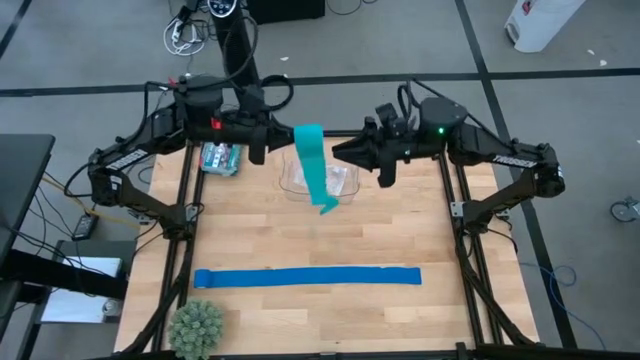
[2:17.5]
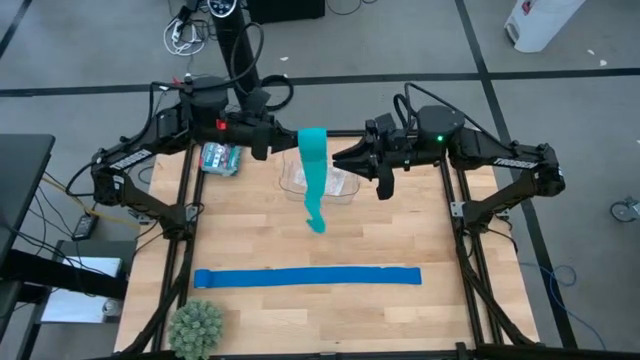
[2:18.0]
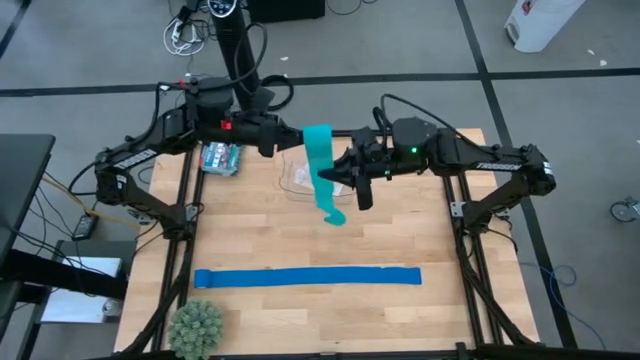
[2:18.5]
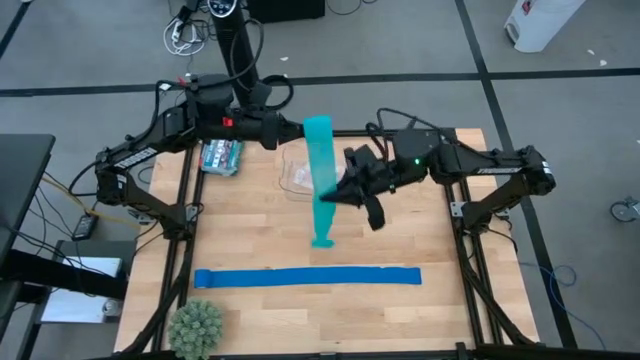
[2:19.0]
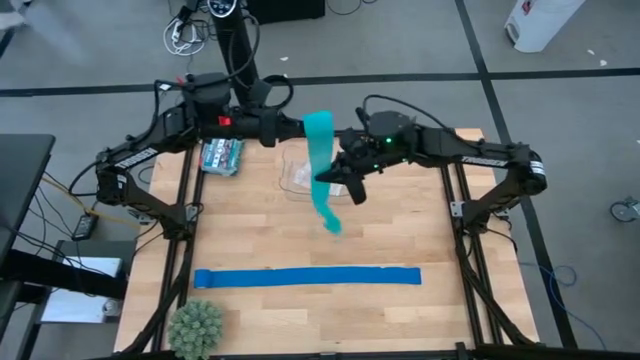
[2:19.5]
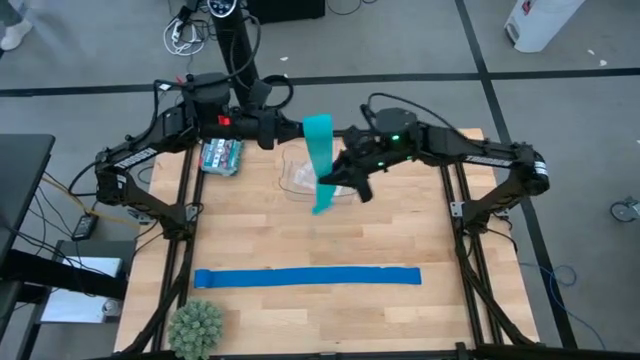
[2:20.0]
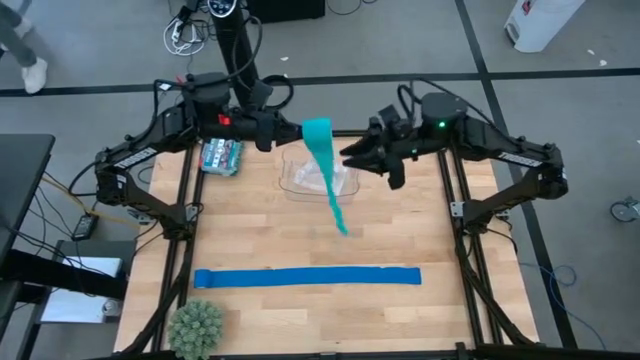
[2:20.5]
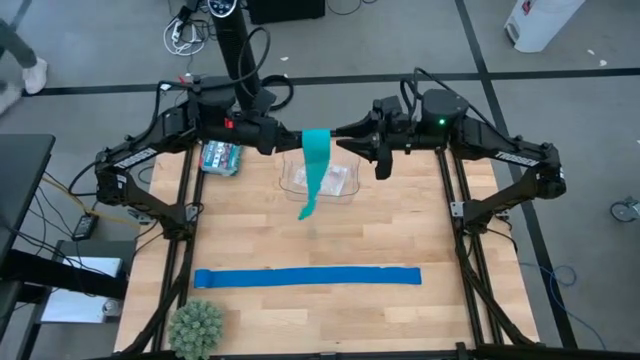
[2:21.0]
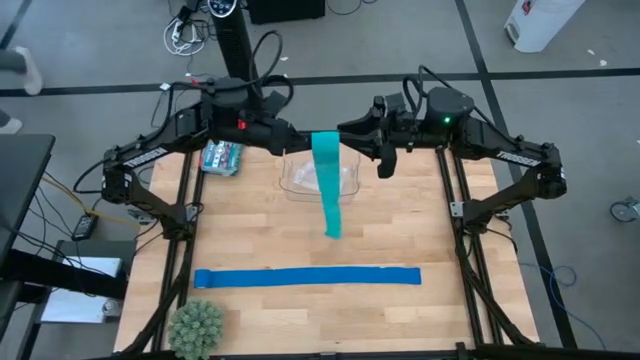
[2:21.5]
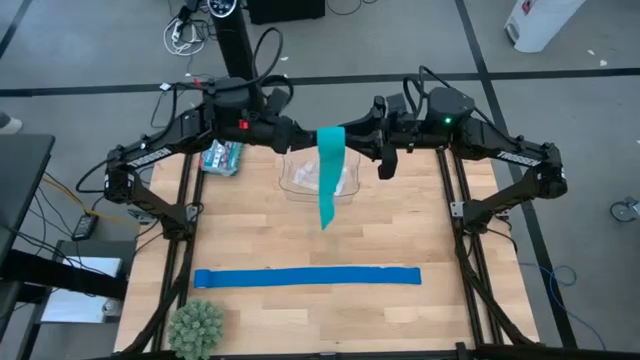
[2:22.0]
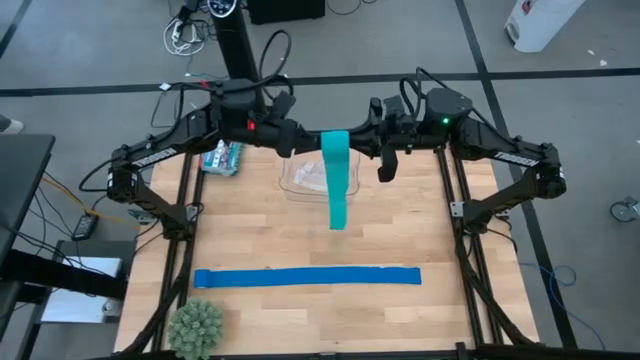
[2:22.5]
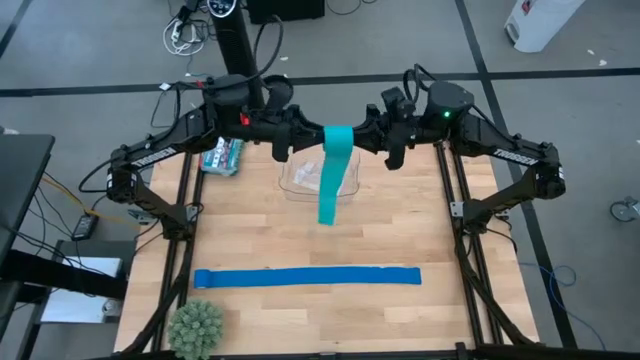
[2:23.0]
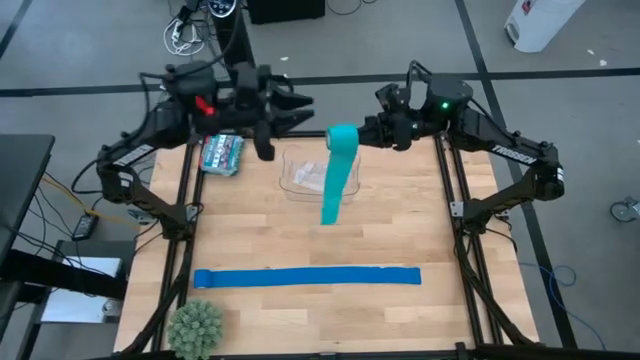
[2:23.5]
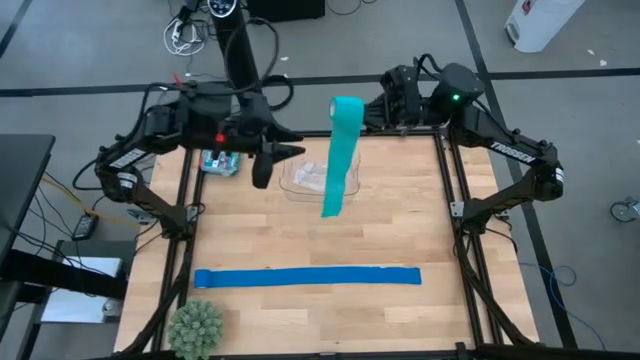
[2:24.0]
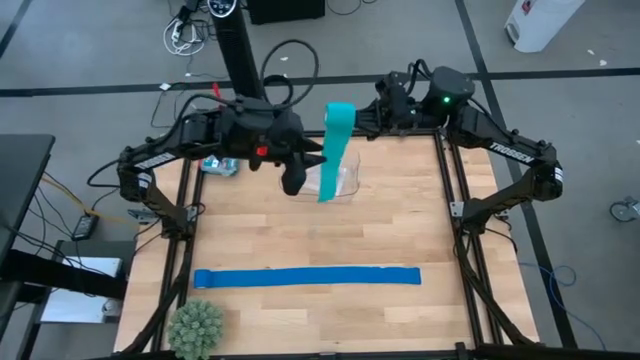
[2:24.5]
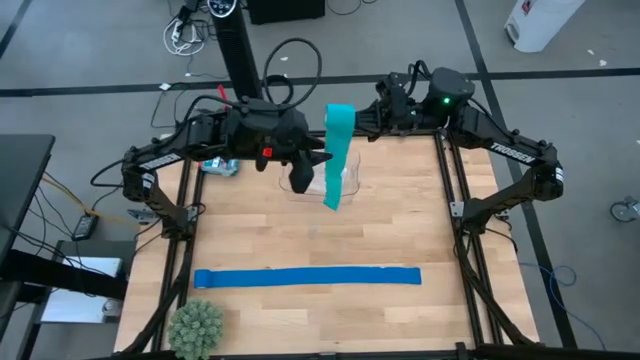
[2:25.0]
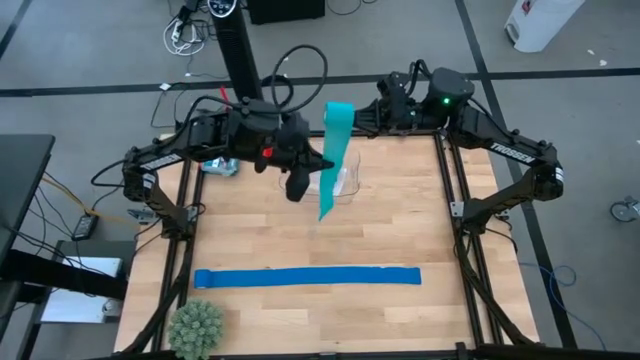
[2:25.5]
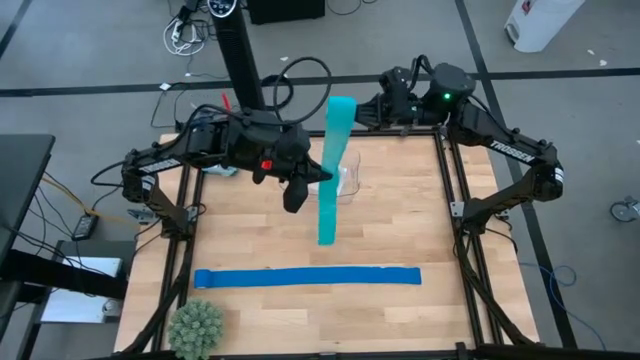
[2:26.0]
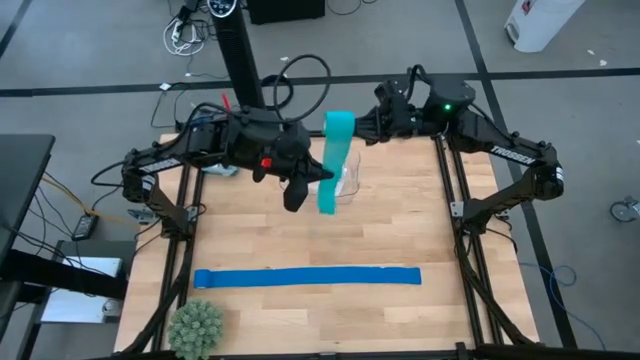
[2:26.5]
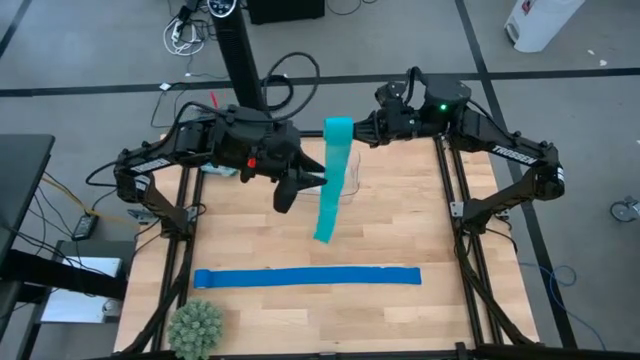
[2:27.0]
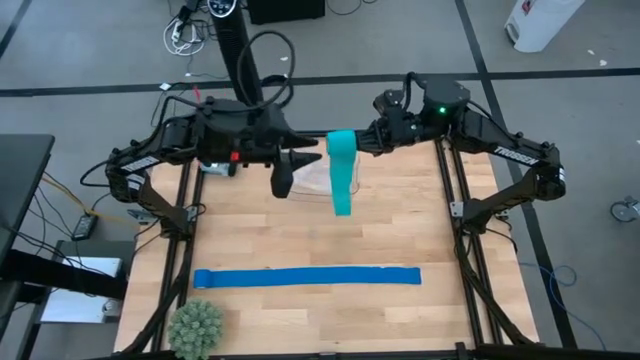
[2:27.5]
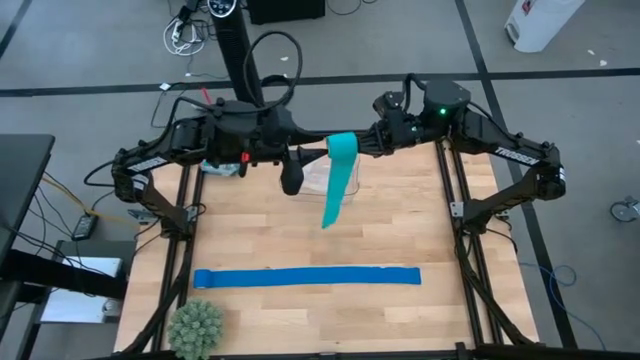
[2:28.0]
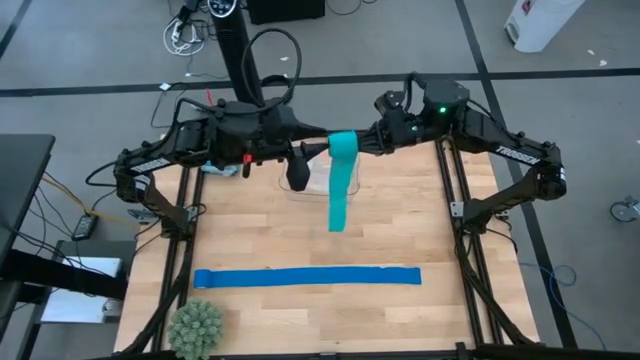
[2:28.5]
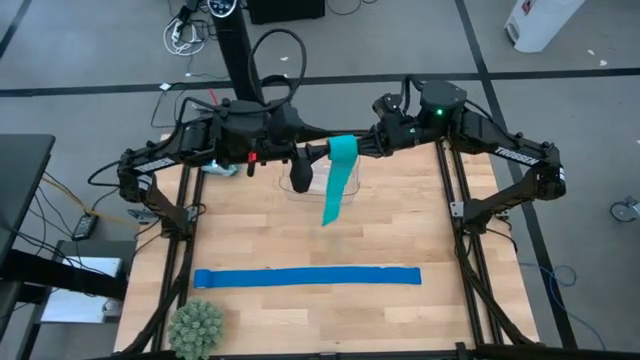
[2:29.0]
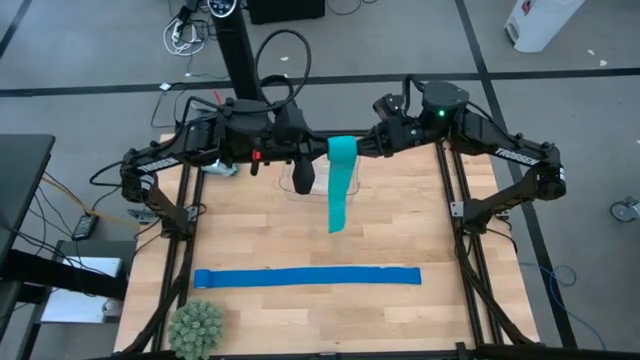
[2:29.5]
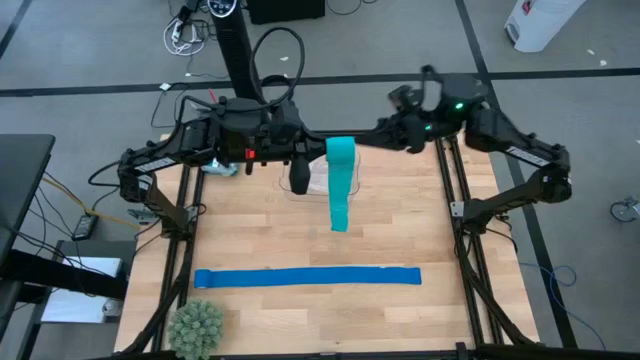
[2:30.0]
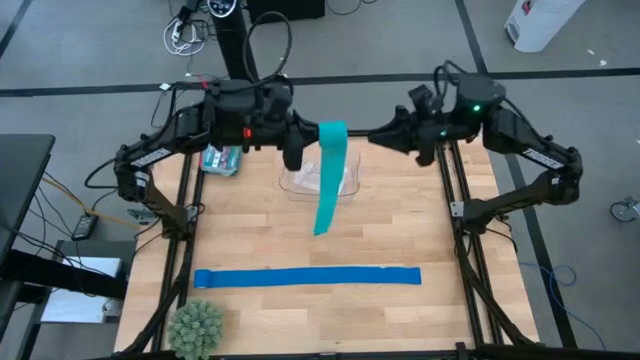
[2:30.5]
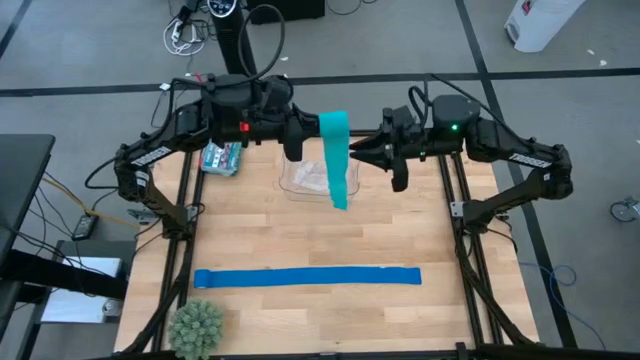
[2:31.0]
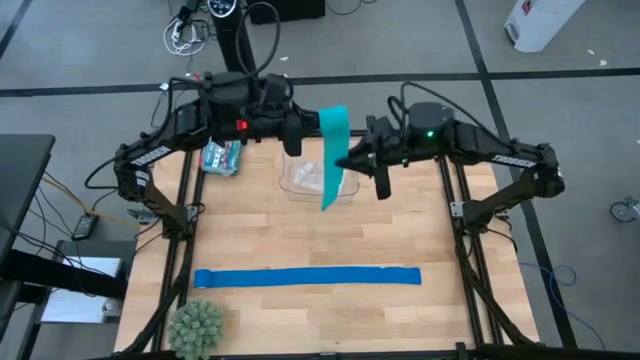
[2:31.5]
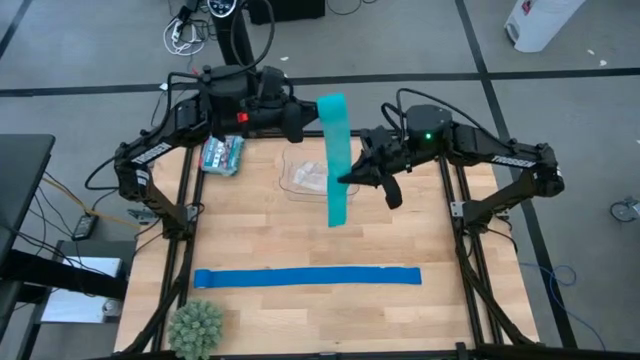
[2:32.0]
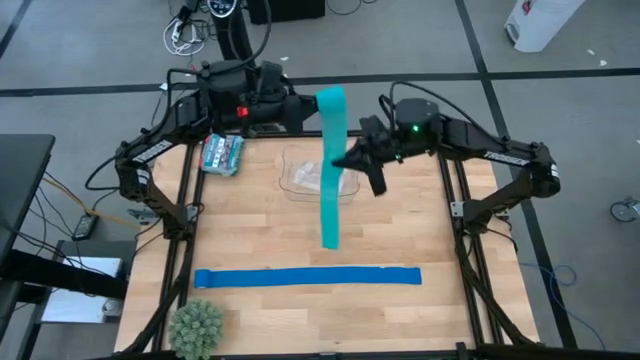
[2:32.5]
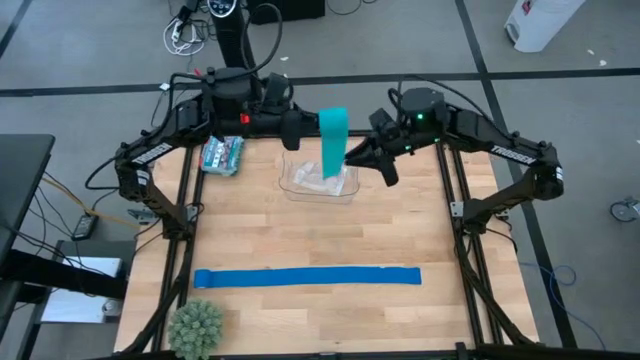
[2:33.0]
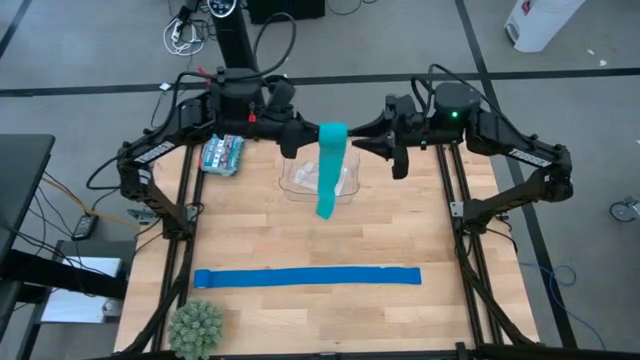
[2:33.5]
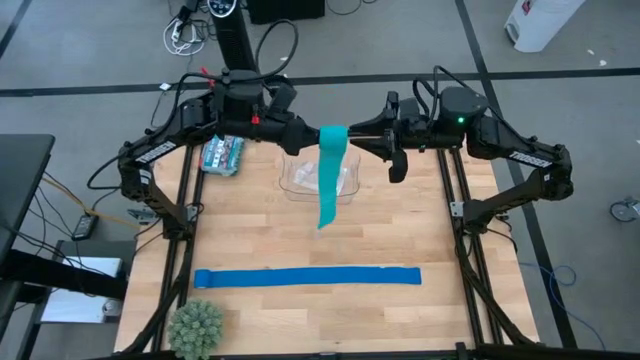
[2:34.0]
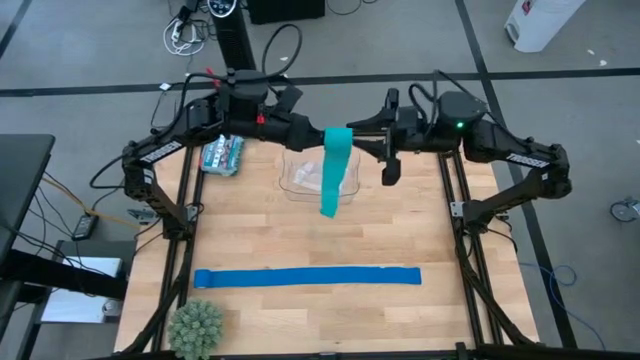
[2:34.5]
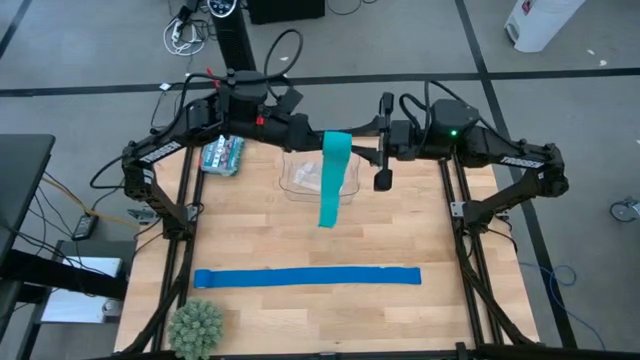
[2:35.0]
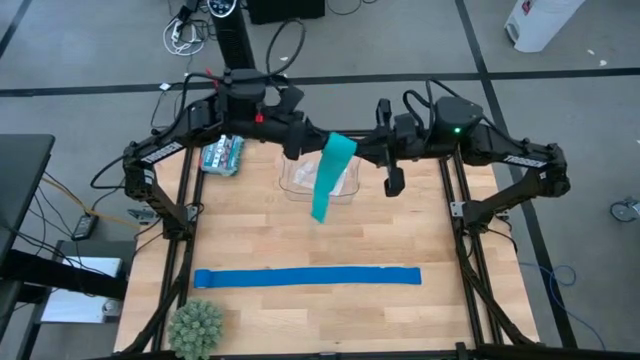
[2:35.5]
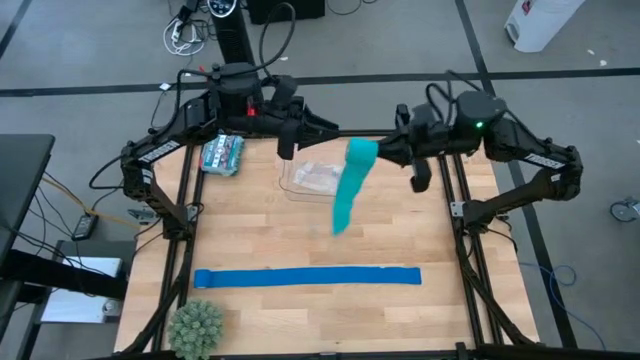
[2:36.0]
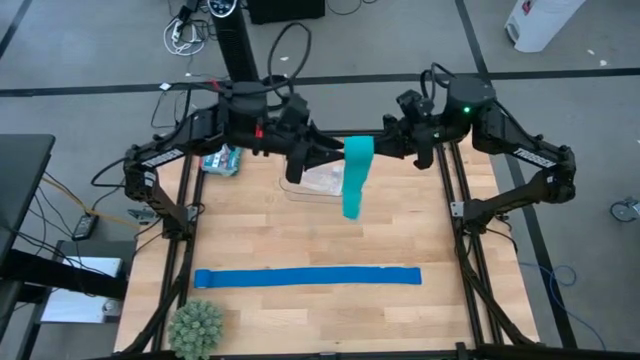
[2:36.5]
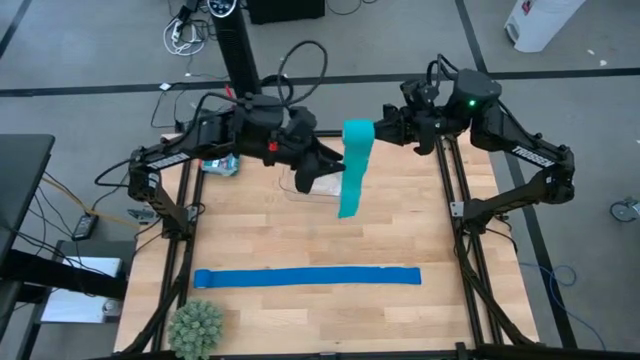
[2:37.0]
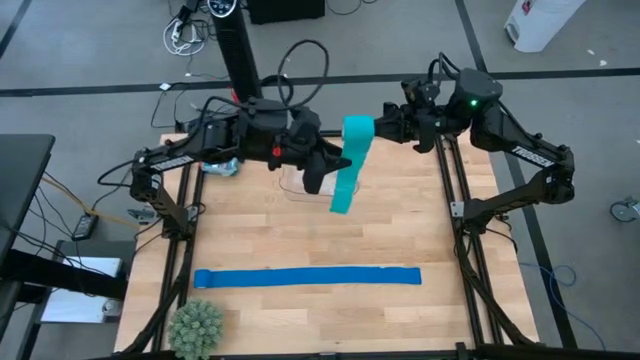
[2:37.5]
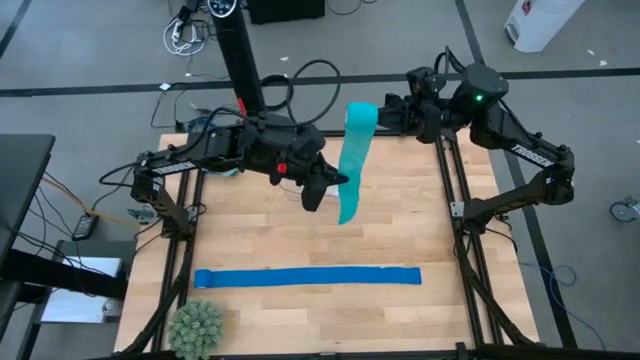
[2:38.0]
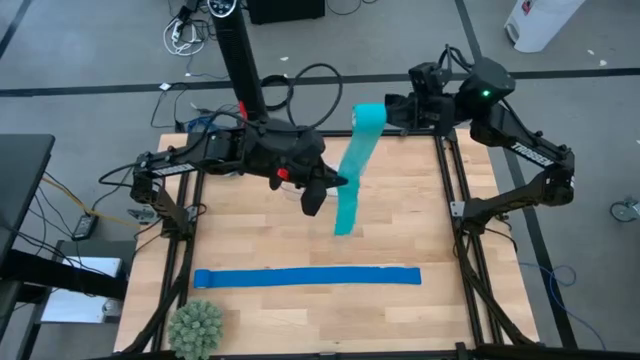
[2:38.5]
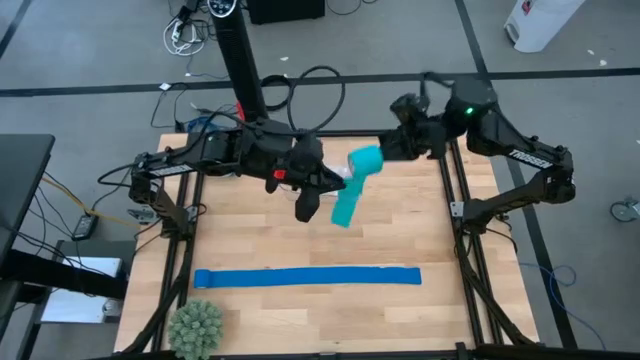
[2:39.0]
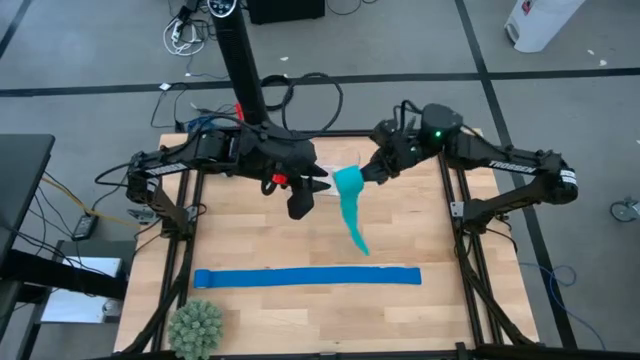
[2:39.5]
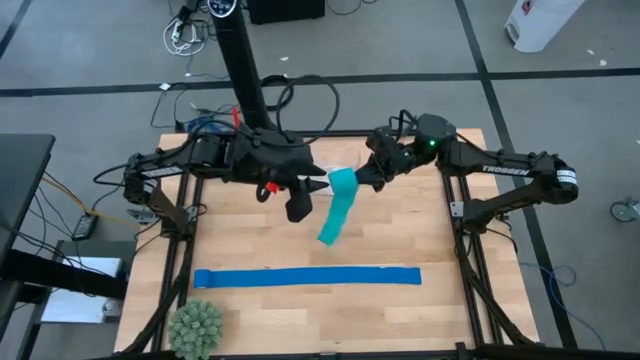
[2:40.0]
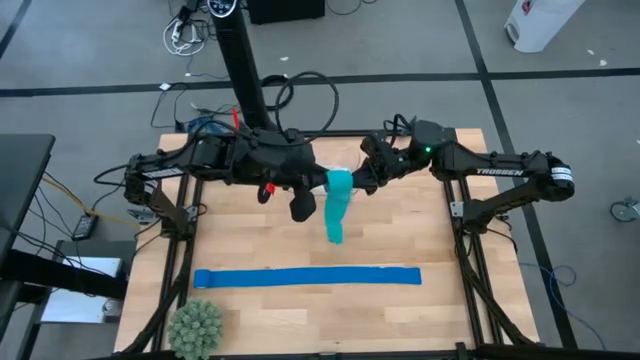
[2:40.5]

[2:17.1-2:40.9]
Task: Roll bandage
Roll the green bandage
